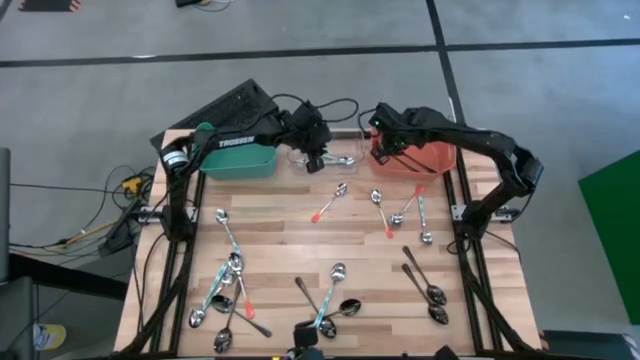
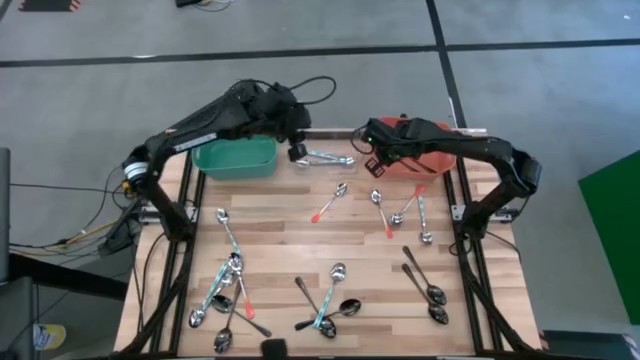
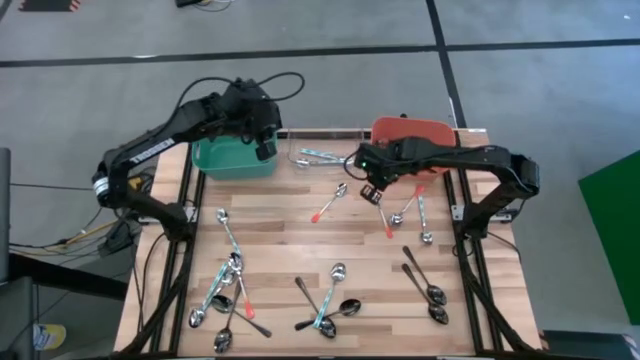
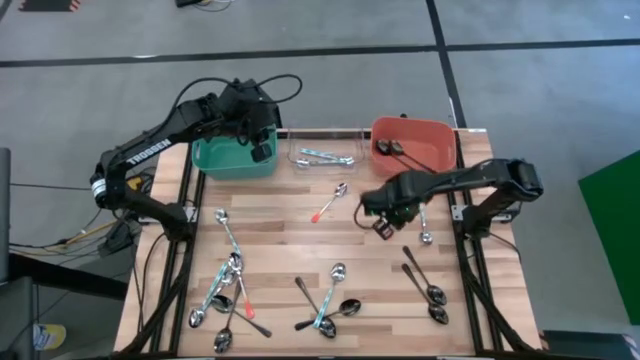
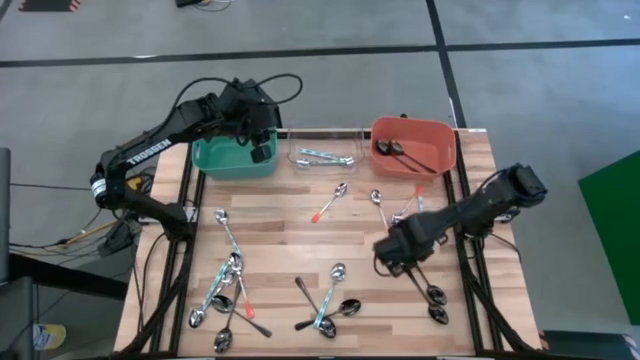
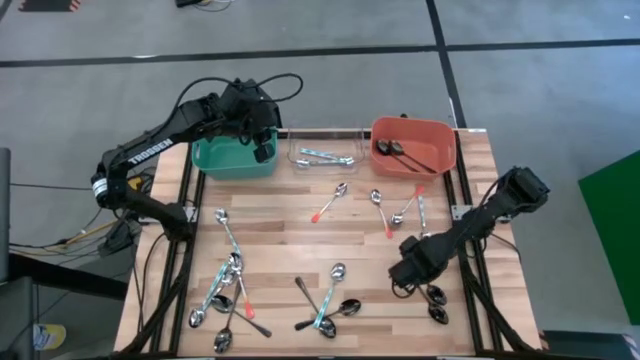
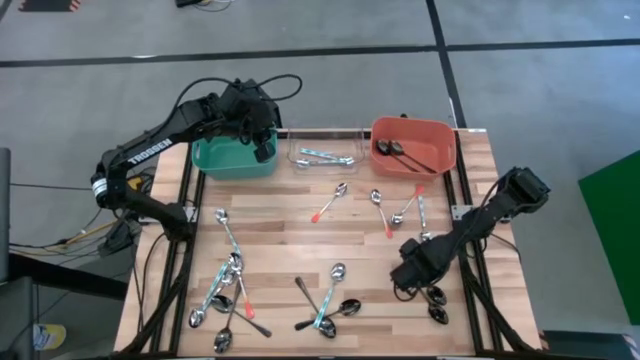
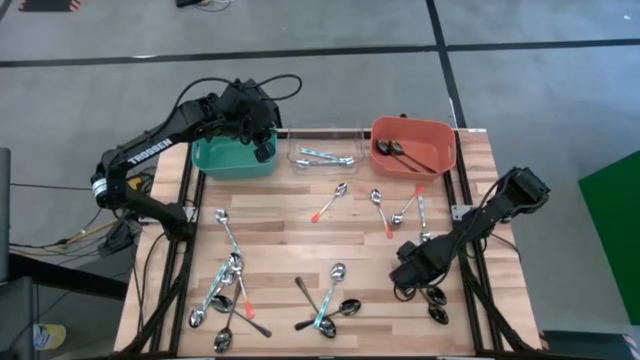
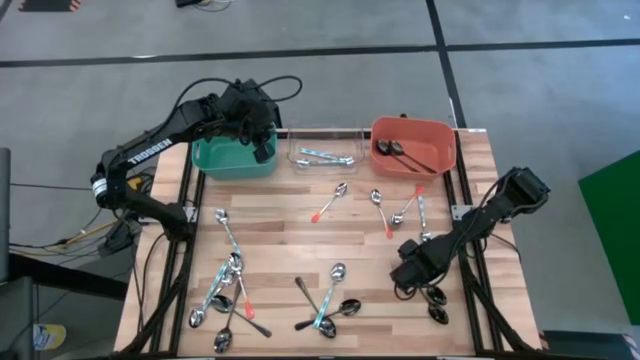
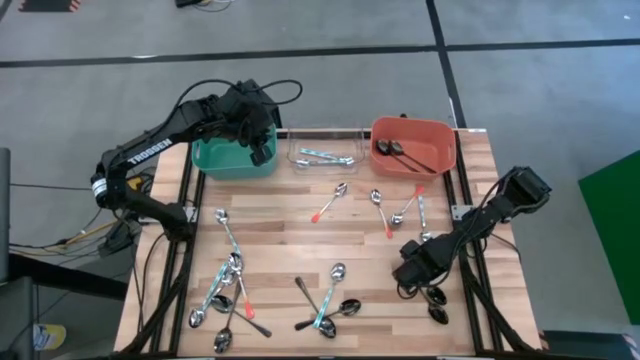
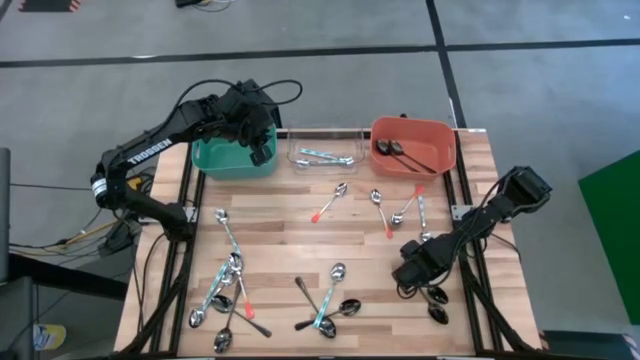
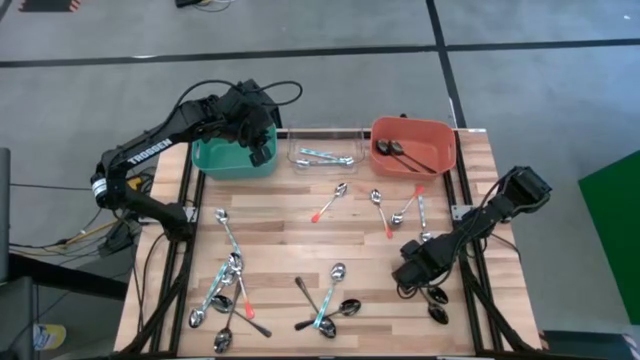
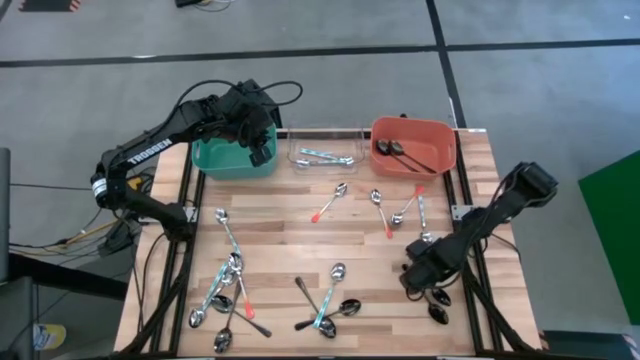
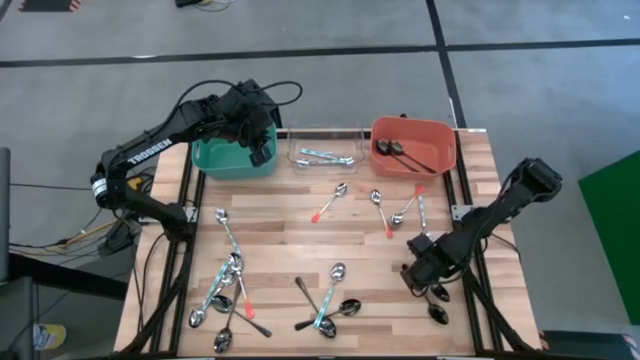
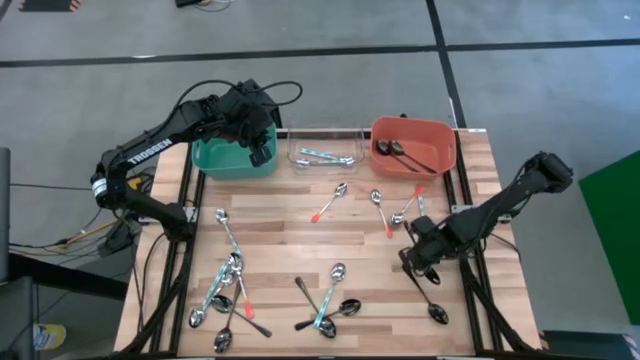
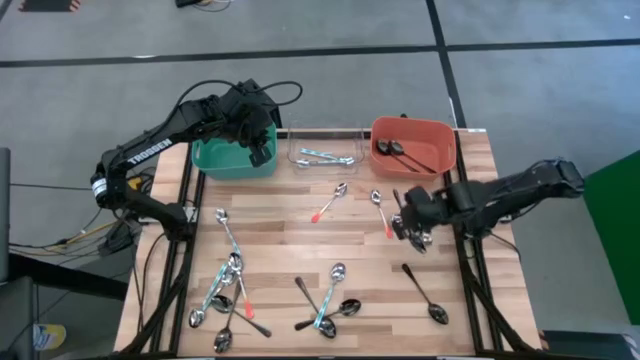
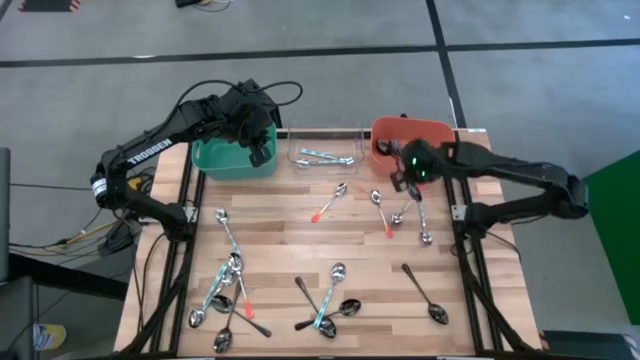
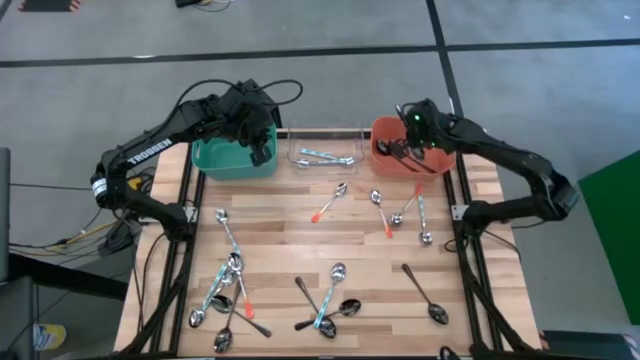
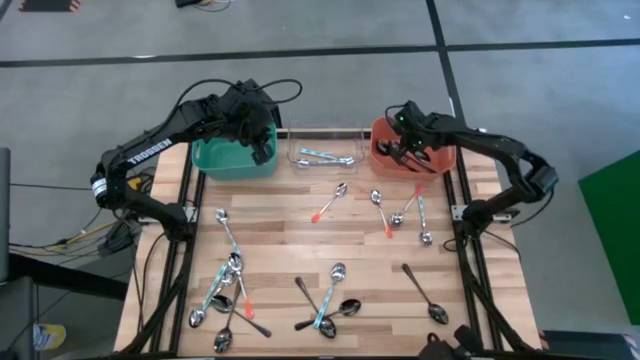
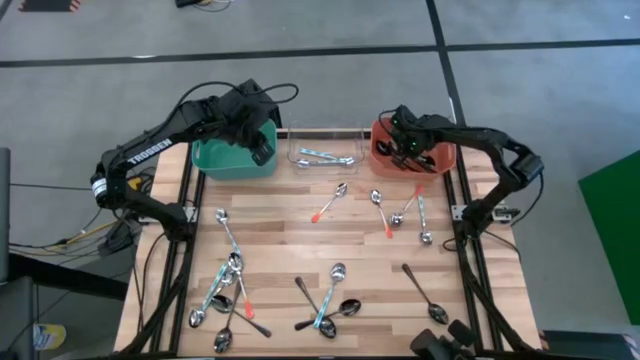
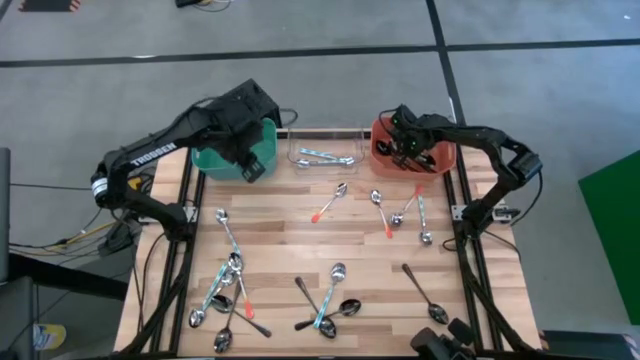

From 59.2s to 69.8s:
Task: Sort silverware by color (type)
Put the black spoon into the orange bin

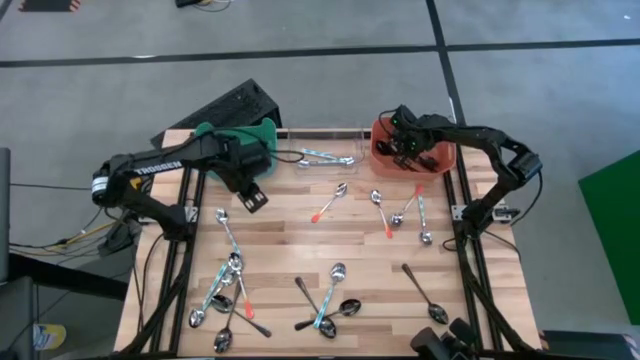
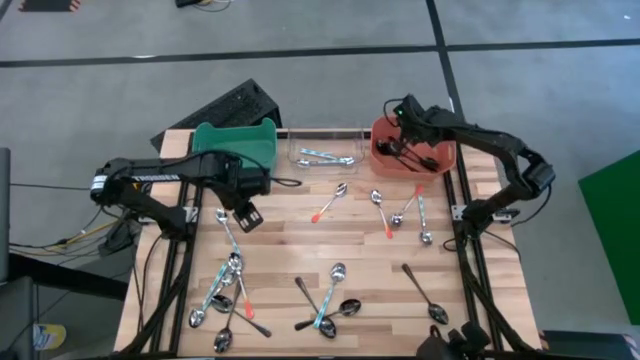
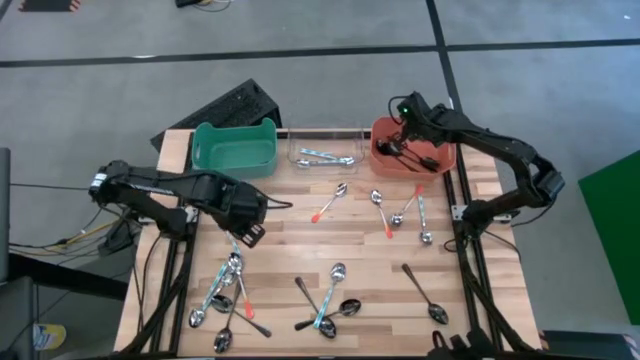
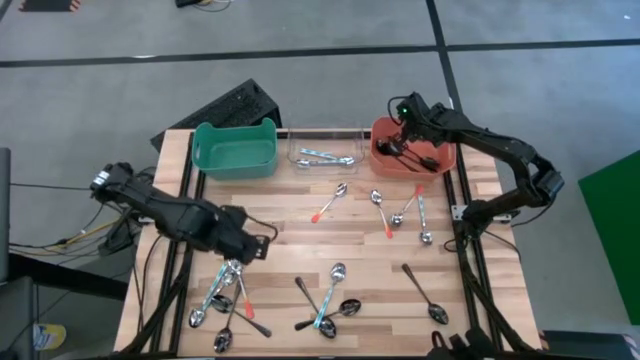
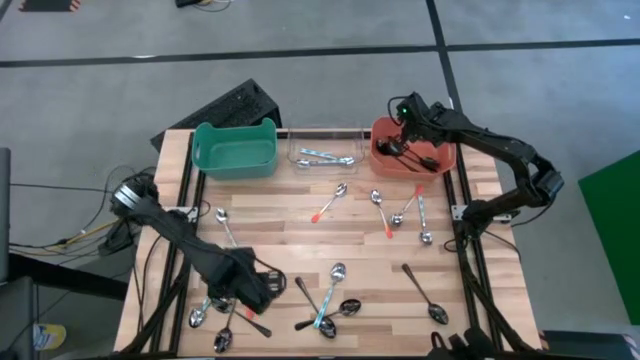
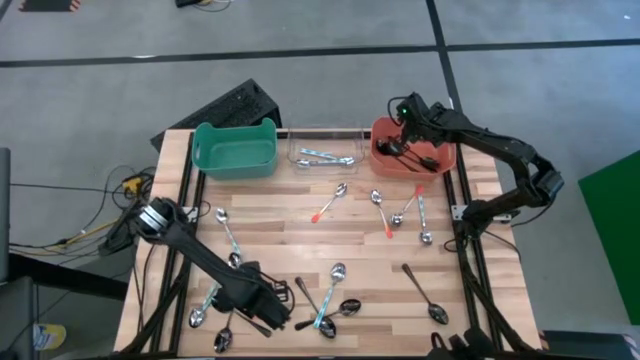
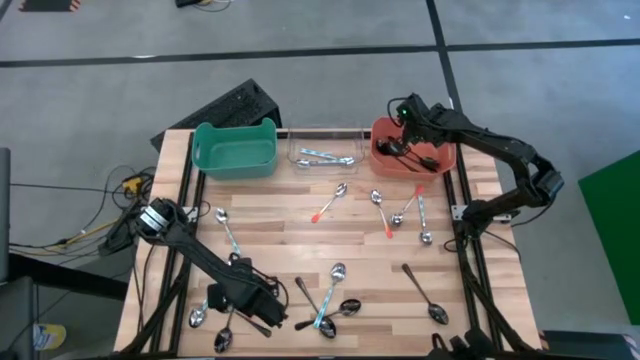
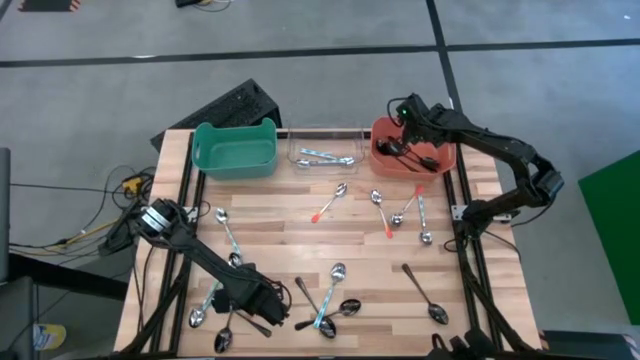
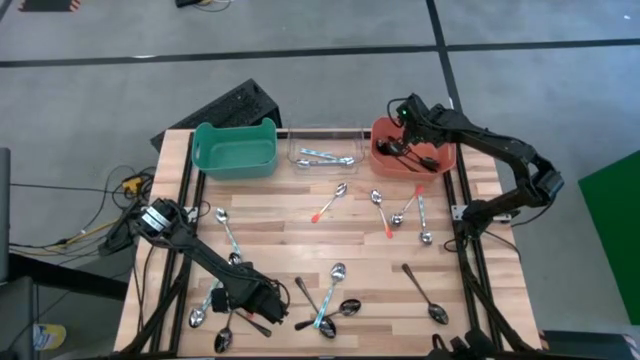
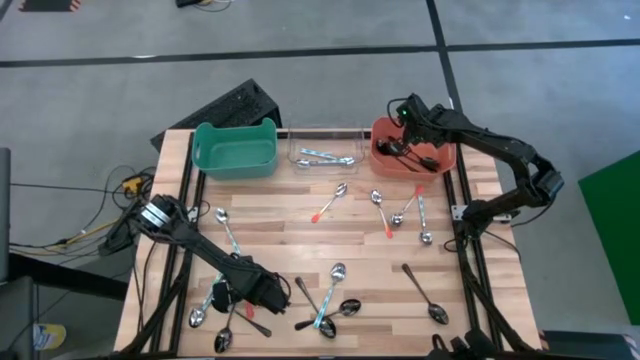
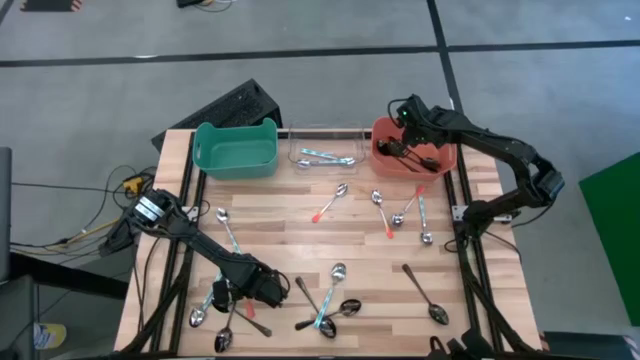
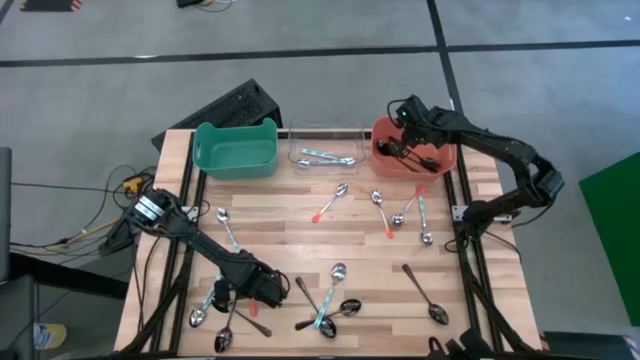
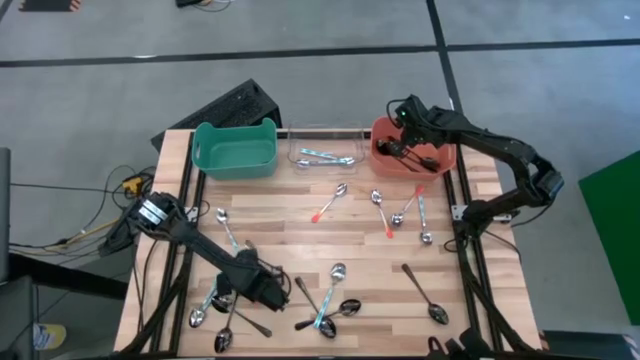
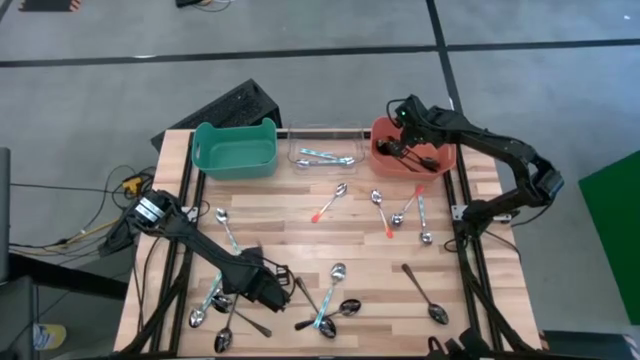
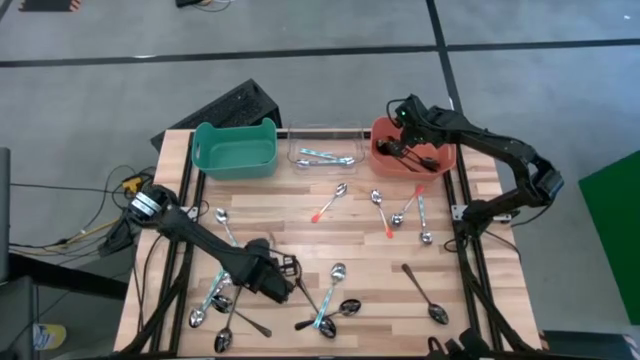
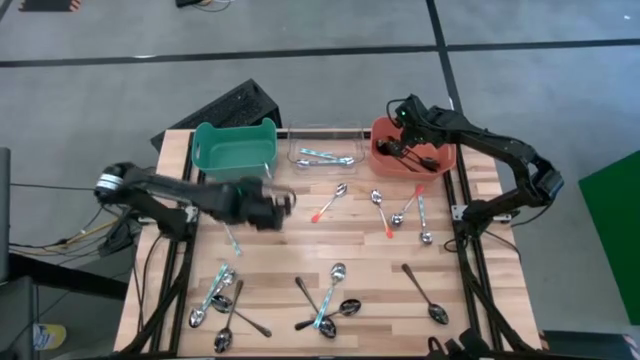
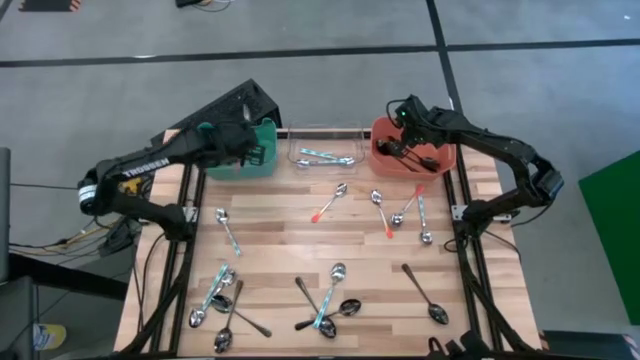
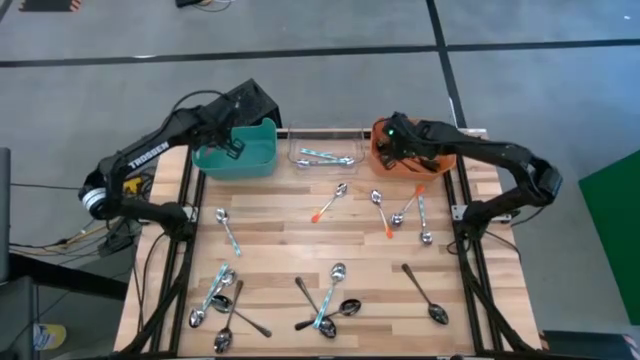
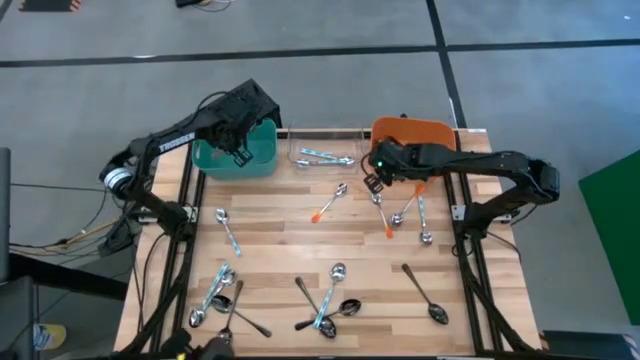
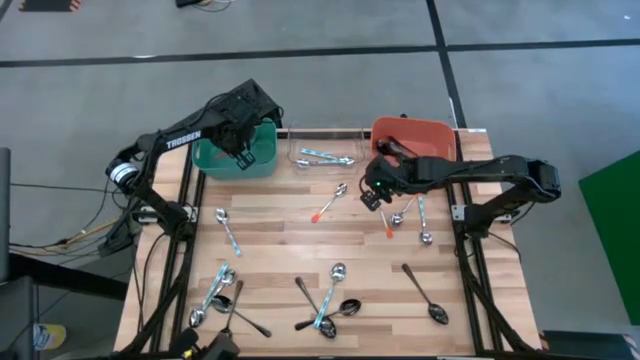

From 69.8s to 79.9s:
Put the orange spoon into the green bin

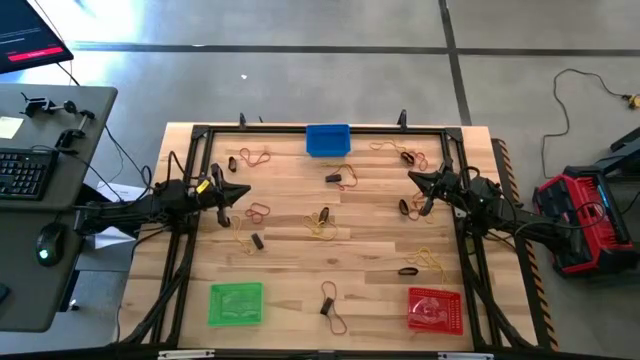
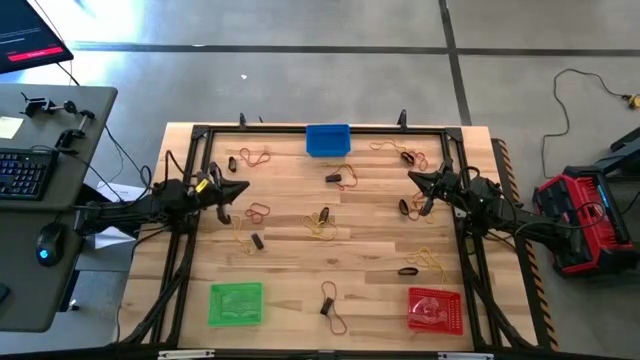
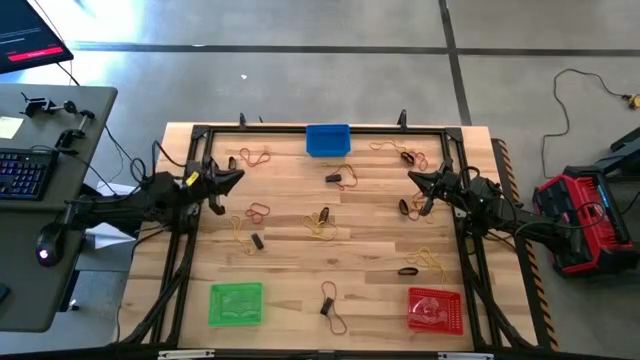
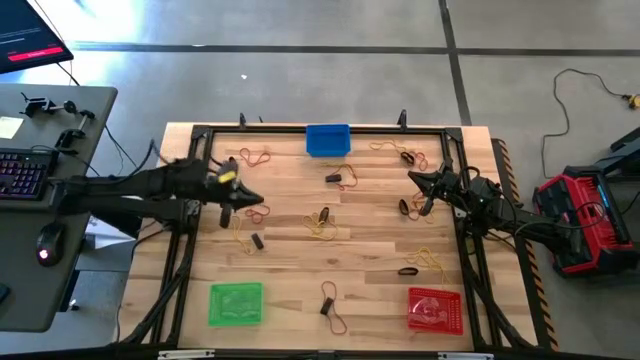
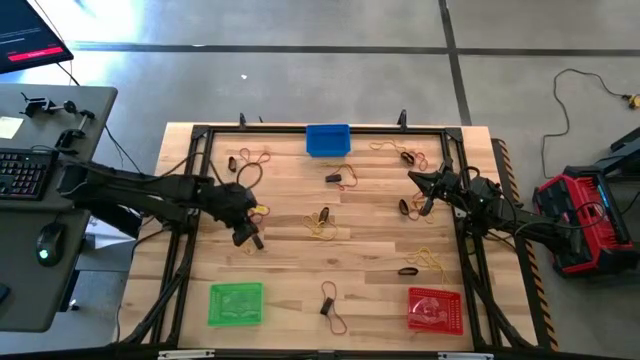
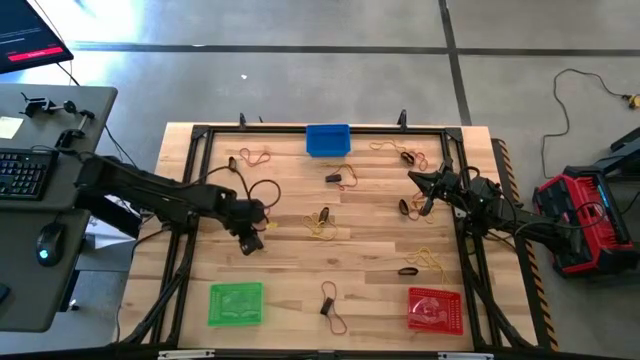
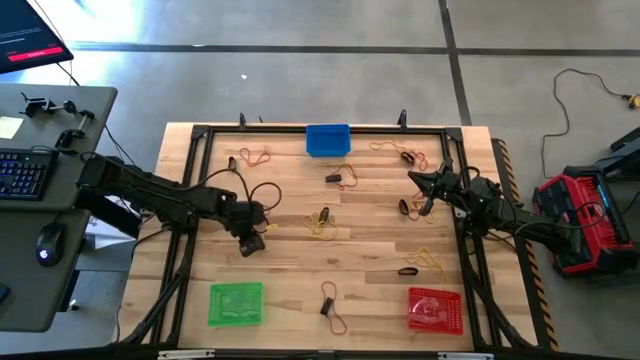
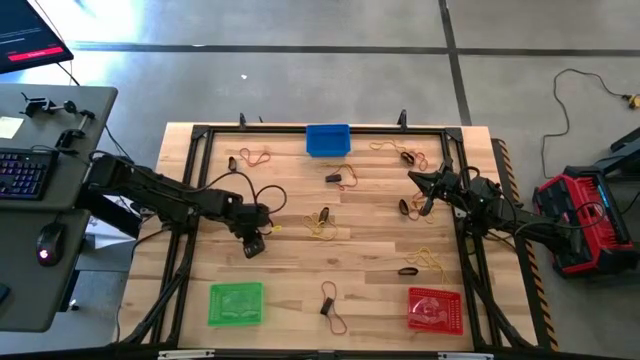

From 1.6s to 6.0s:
Task: Sort rubber bands into baskets
Put the black rubber band into the blue basket
